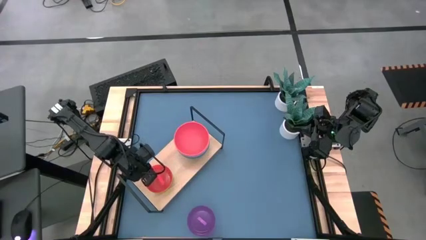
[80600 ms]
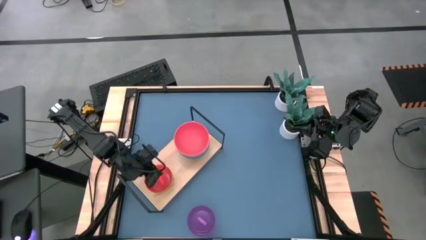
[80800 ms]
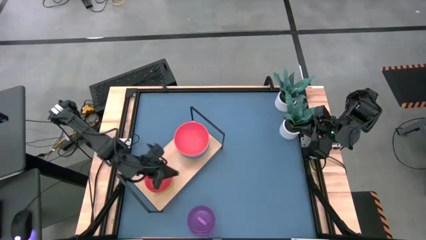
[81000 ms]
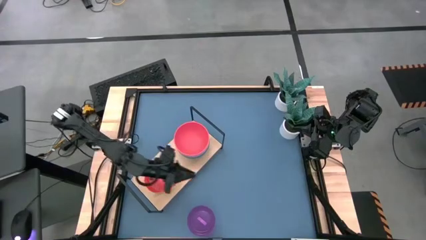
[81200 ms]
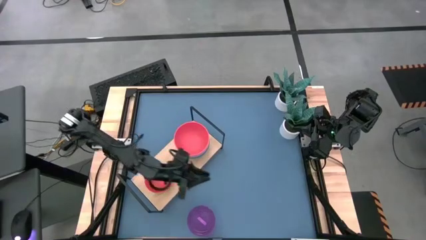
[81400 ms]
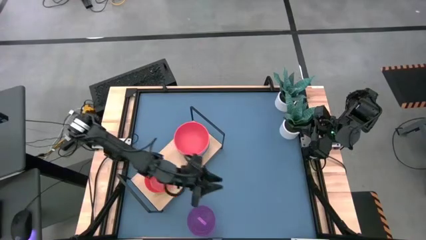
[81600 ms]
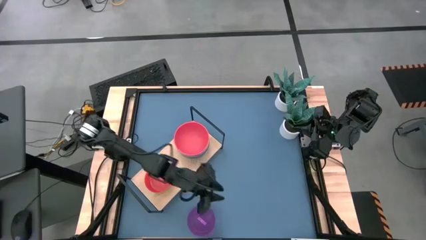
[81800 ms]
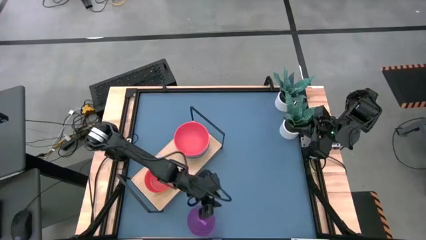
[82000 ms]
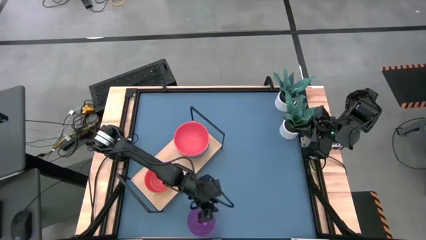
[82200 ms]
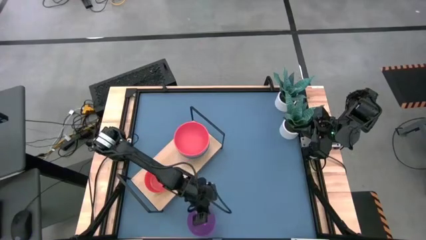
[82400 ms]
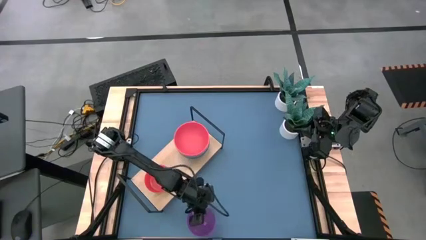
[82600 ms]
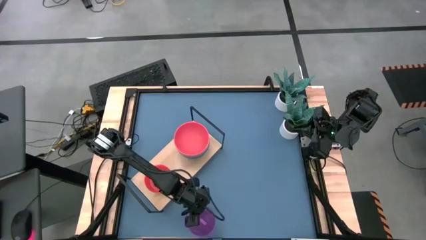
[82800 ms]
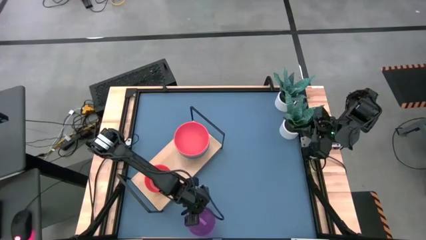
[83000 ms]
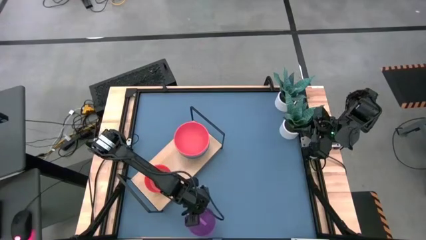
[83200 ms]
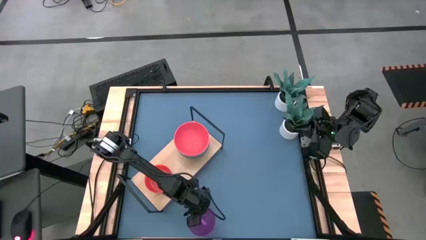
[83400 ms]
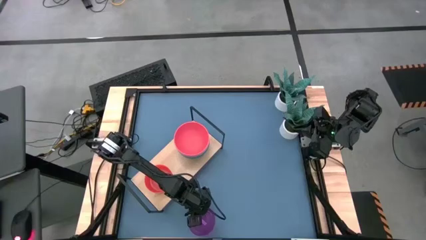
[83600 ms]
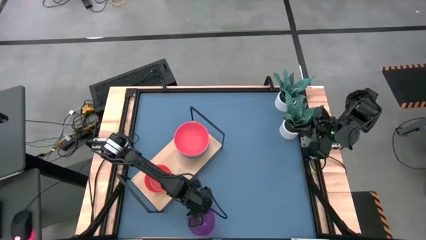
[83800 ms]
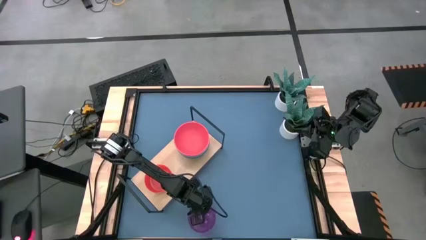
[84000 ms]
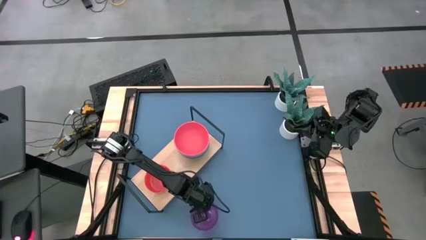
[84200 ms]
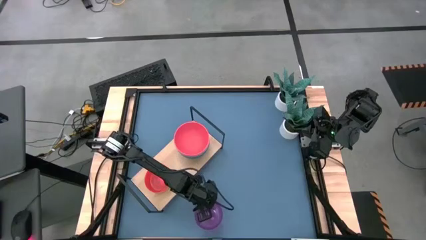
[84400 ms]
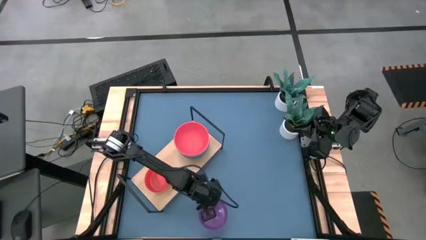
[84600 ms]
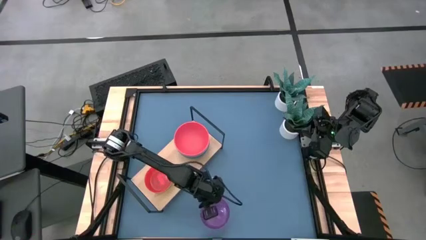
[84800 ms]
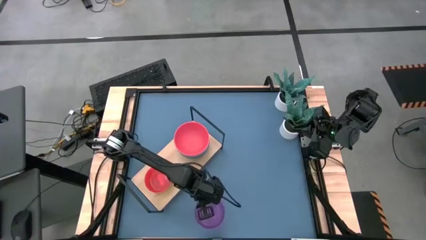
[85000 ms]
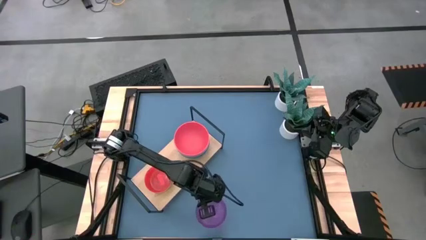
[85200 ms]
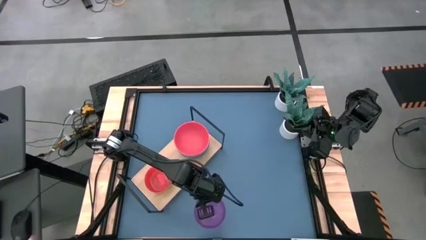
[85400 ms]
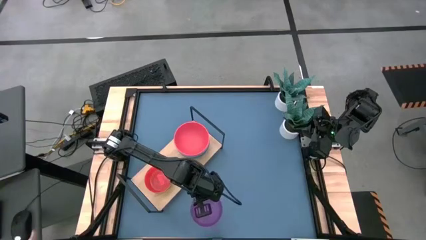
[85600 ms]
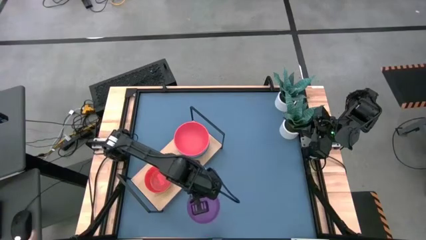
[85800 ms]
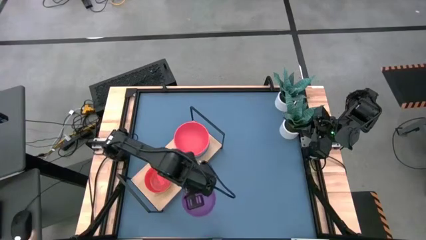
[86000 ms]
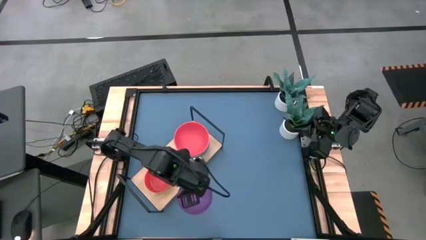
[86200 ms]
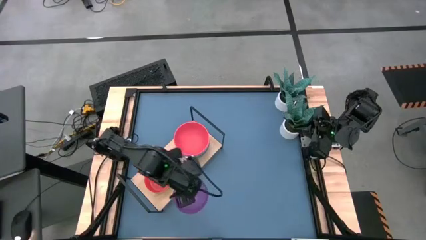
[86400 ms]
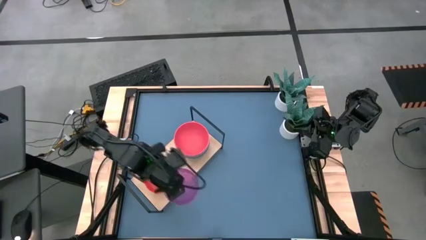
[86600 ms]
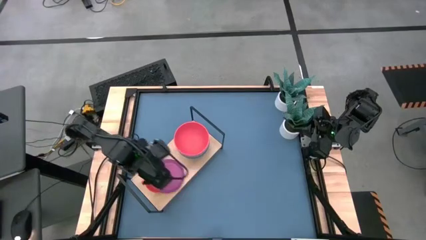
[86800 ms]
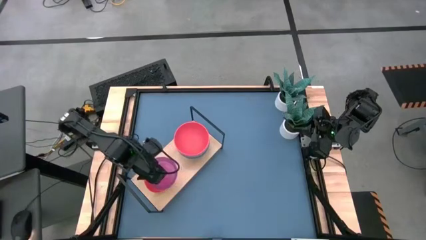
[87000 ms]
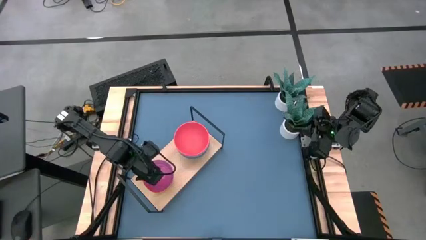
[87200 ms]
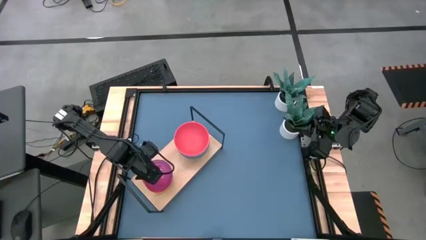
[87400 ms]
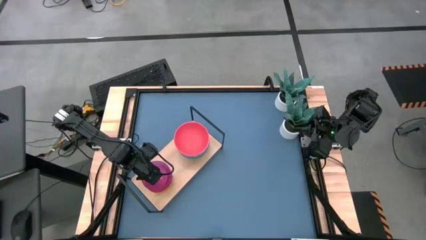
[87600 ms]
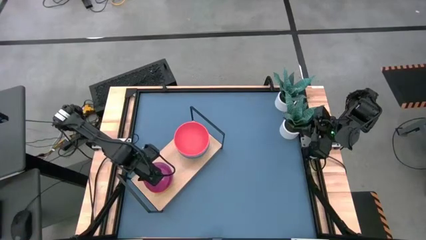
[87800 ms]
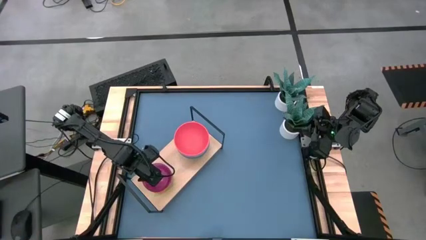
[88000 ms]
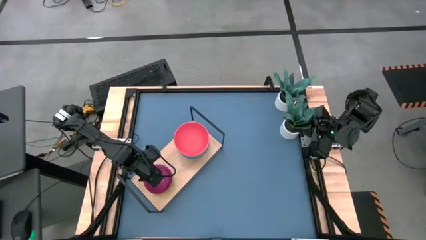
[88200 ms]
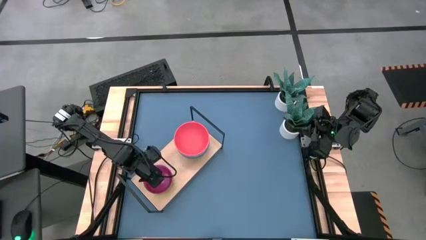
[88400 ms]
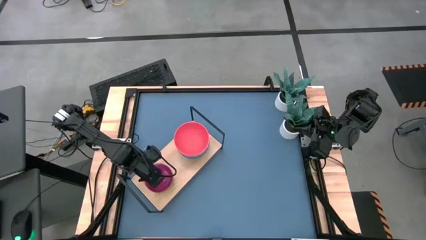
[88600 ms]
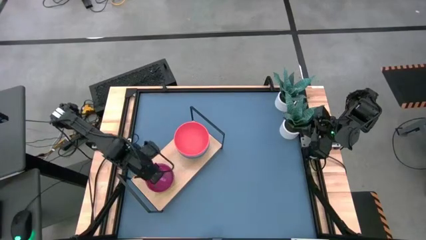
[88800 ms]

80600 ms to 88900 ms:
Task: Place and stack bowls onto a shelf
Stack the violet bowl on the small orange bowl on the shelf

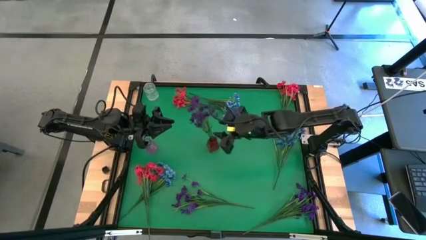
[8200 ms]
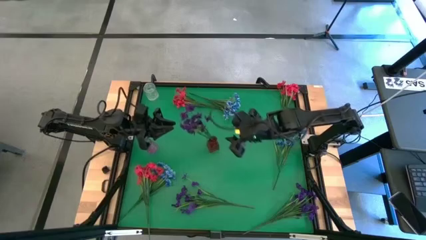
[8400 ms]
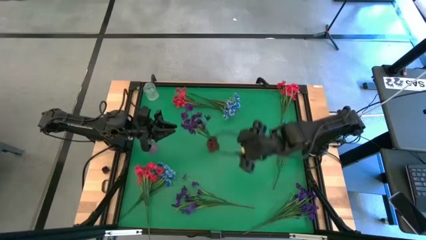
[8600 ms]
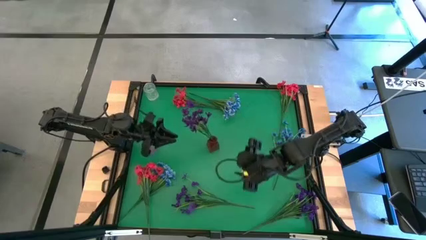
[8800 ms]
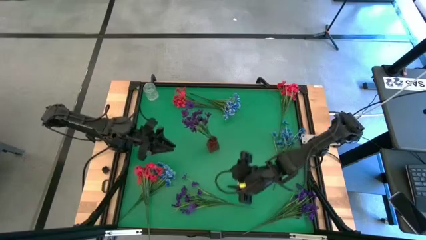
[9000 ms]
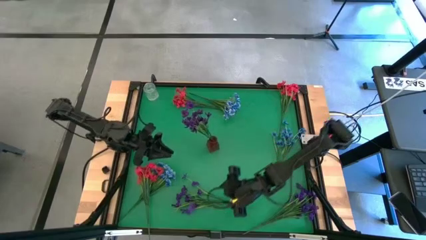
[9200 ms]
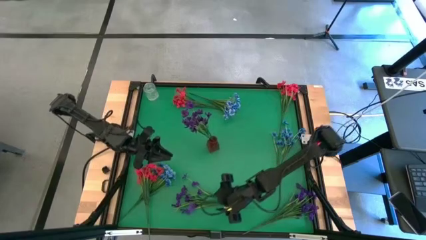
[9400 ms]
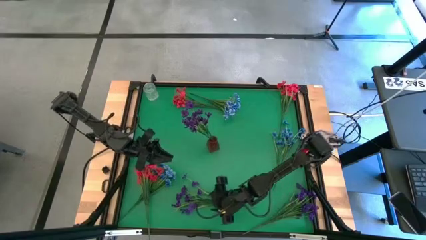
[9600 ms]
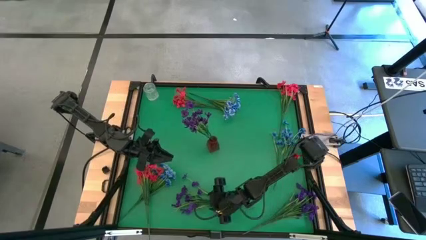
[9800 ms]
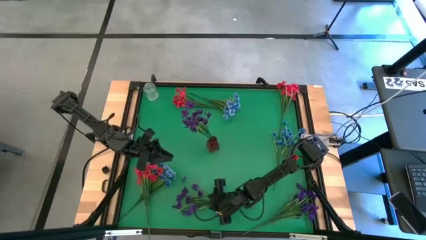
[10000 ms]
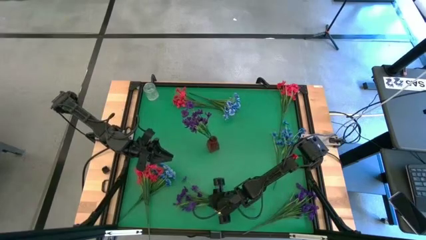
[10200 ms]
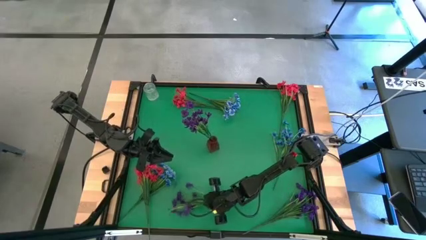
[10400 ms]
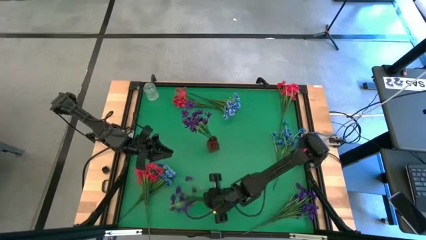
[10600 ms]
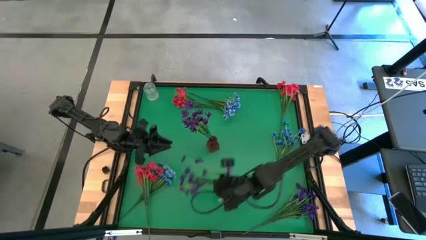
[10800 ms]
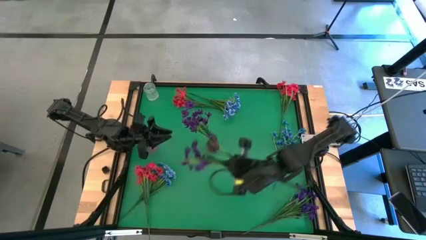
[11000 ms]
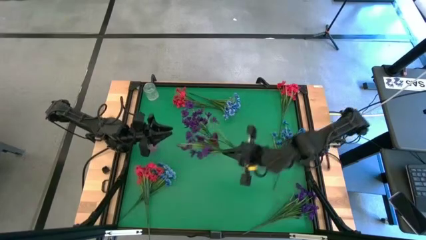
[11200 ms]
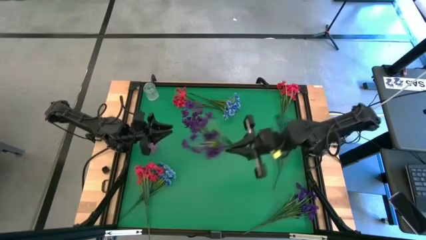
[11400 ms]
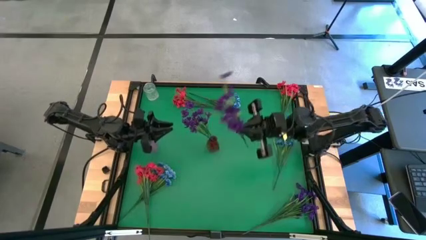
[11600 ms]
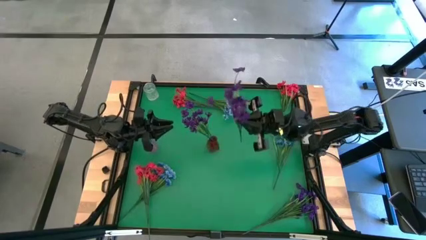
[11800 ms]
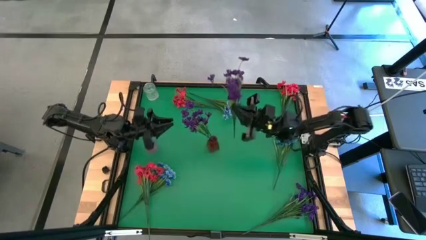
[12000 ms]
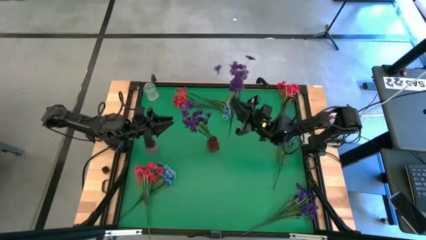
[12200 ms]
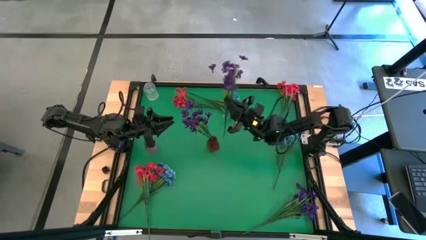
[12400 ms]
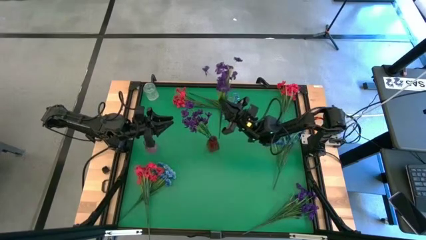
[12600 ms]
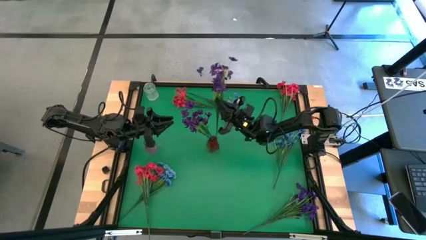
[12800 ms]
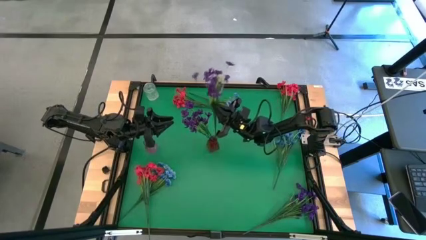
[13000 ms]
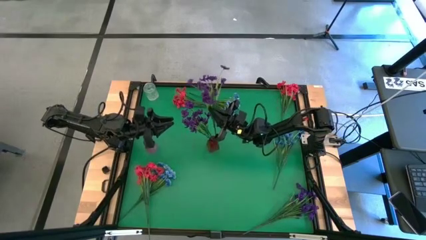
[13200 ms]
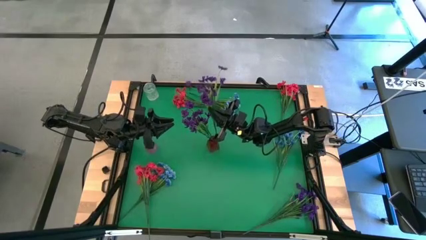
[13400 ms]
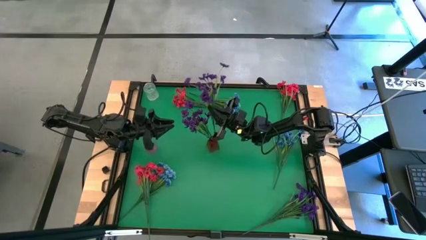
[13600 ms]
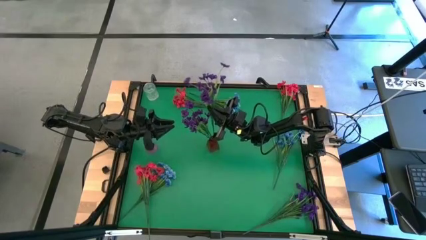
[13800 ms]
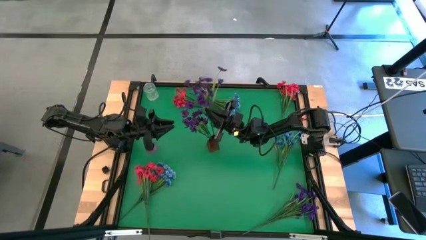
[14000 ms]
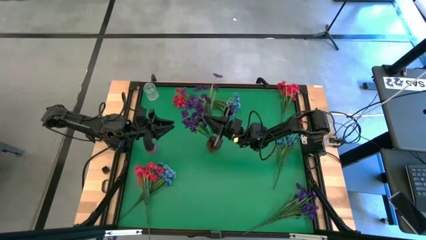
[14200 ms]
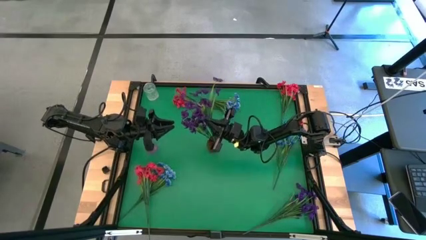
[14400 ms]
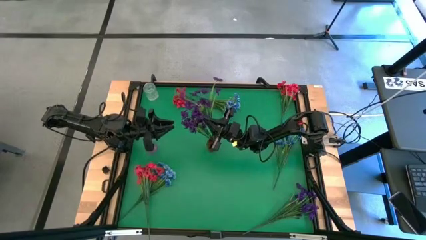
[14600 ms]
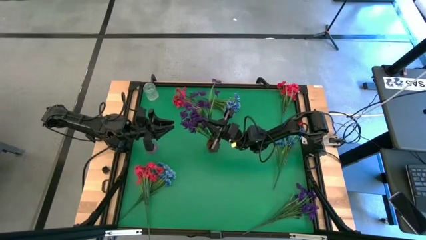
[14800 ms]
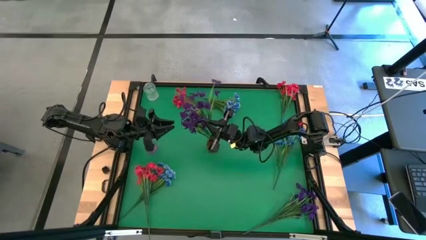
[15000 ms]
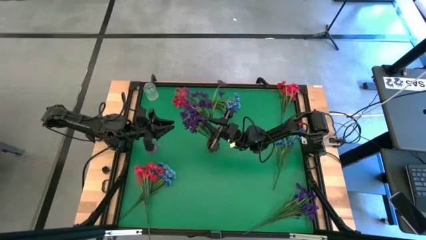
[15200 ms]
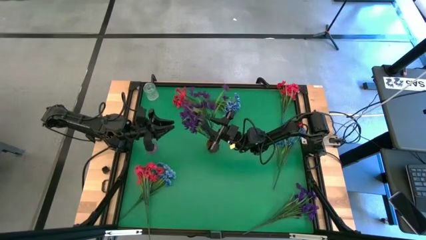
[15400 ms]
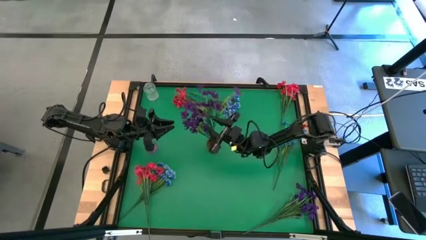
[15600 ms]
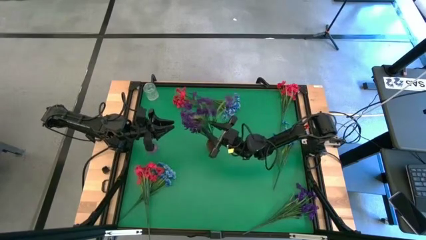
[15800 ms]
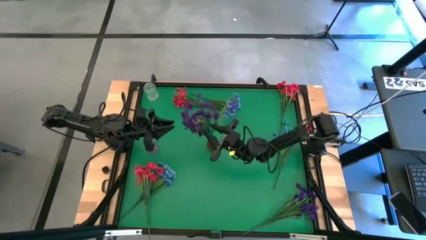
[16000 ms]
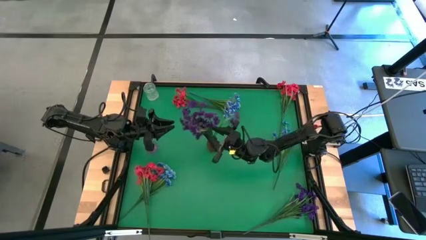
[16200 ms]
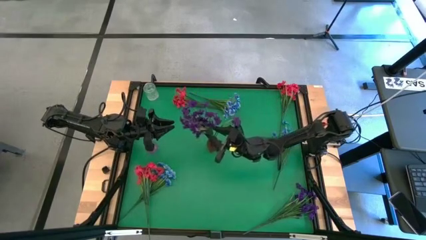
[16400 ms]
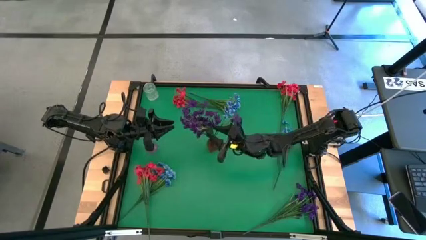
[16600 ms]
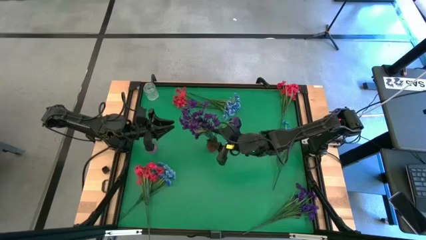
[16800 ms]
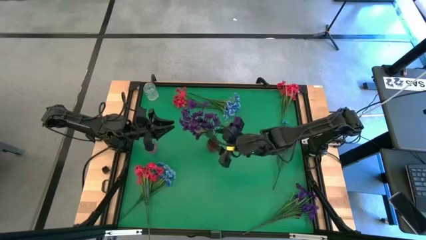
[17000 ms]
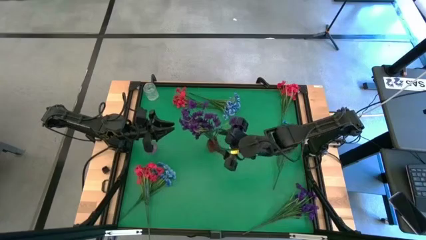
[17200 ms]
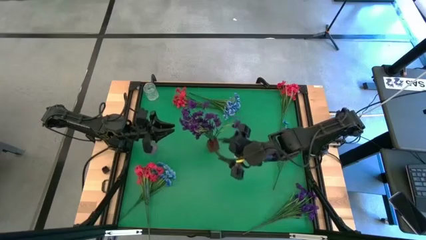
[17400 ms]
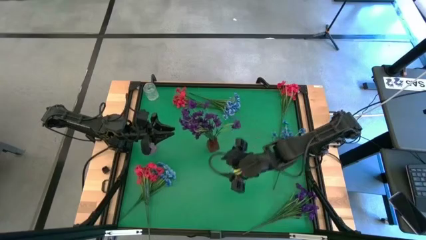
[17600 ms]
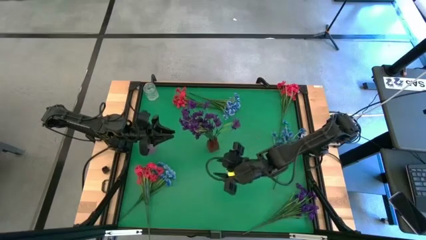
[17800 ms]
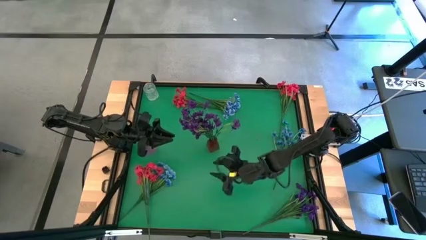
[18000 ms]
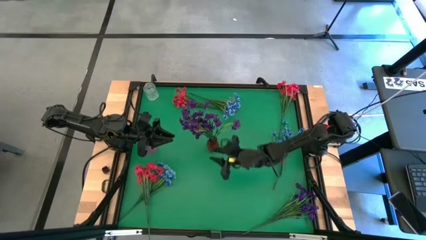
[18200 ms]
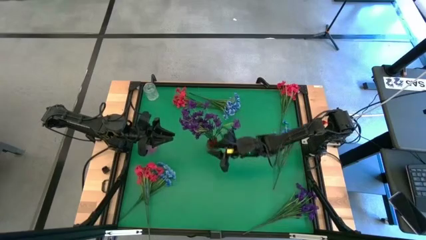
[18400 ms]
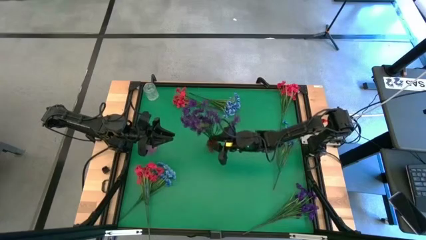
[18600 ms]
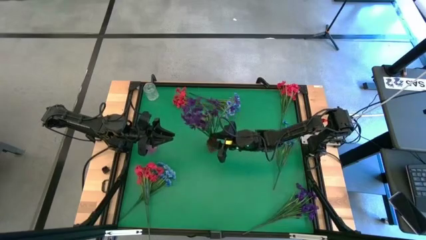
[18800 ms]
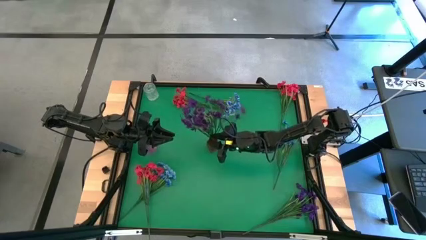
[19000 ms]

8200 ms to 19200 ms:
Task: Sort flowers into vase by color
Put the left violet flowers into the red vase
